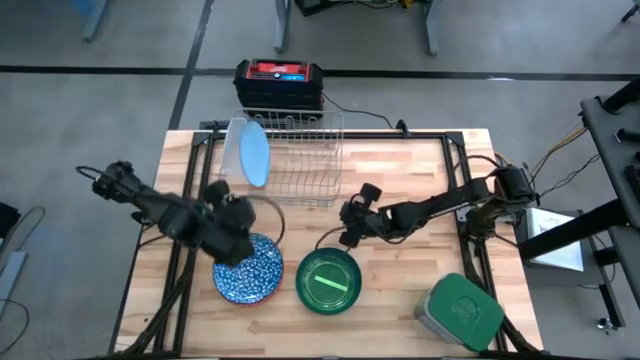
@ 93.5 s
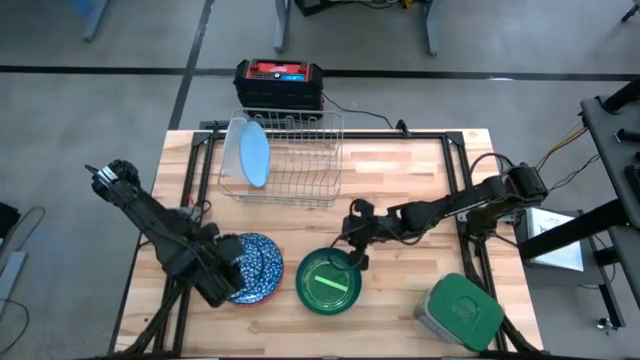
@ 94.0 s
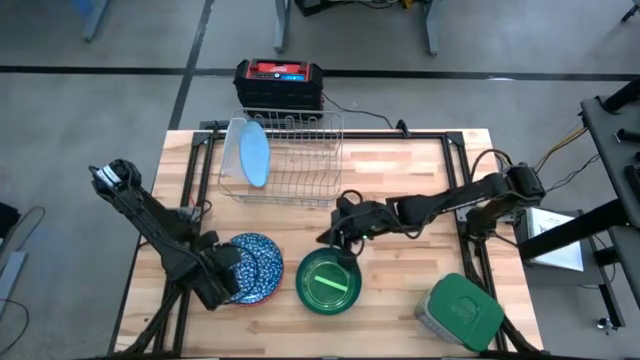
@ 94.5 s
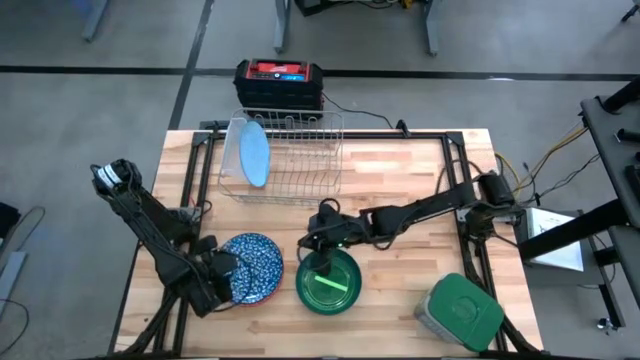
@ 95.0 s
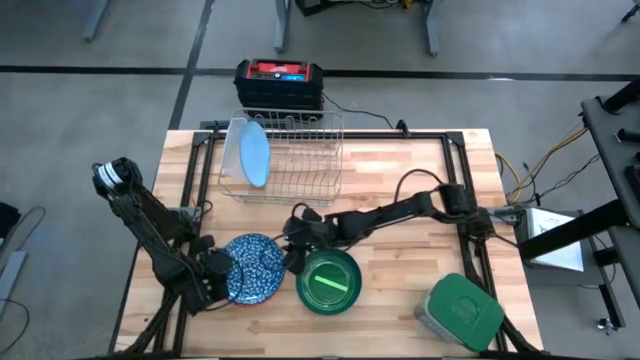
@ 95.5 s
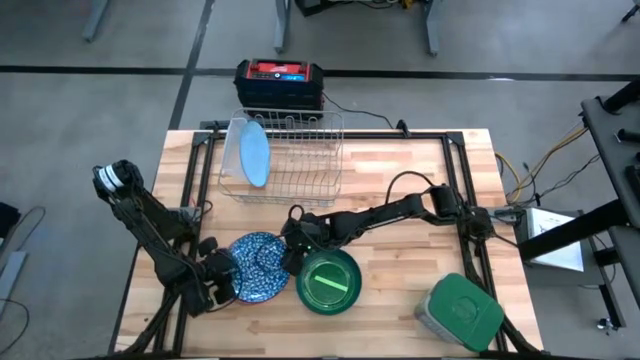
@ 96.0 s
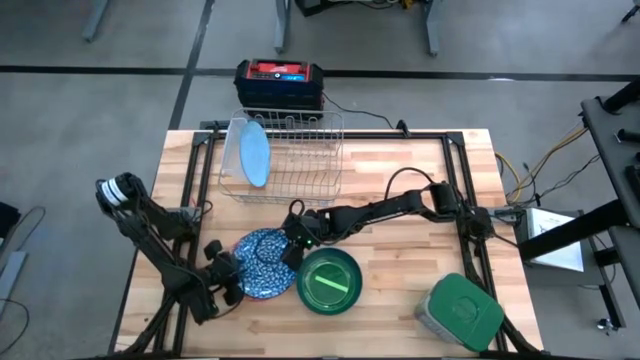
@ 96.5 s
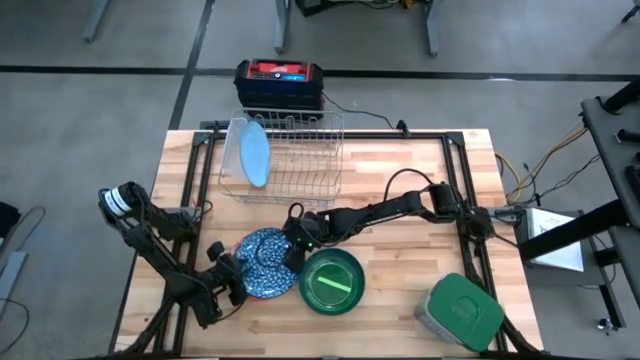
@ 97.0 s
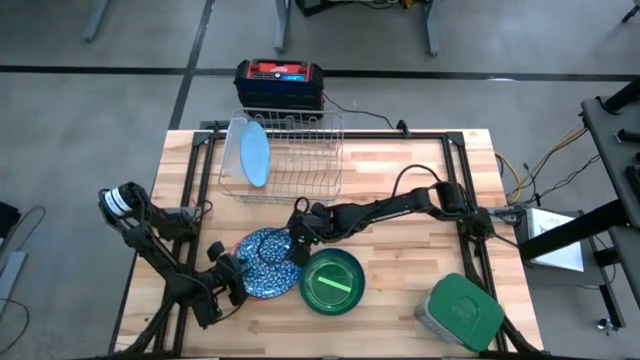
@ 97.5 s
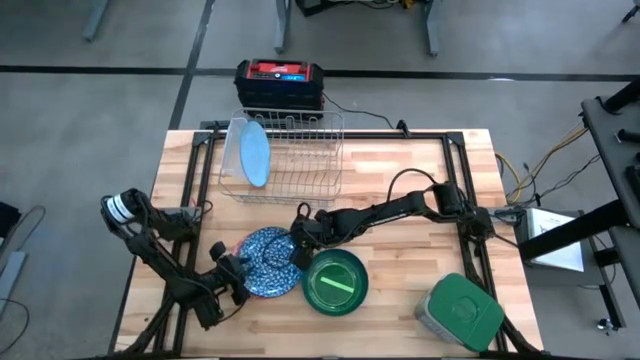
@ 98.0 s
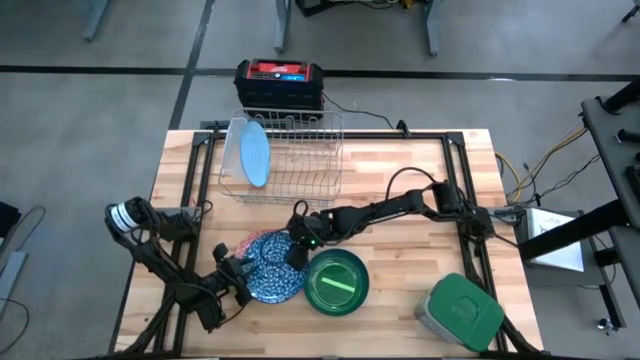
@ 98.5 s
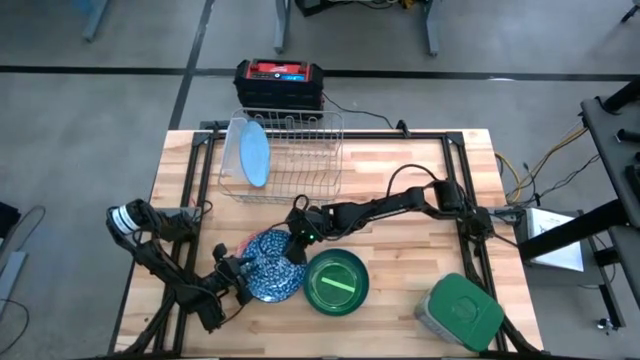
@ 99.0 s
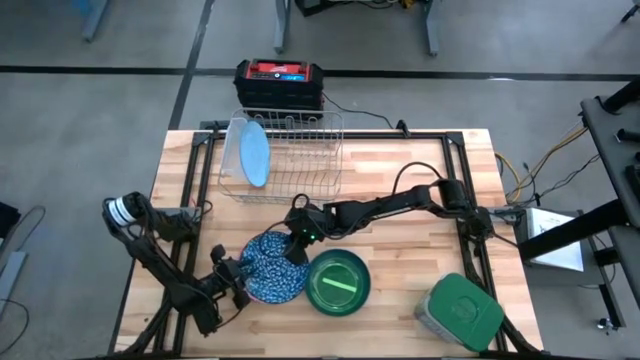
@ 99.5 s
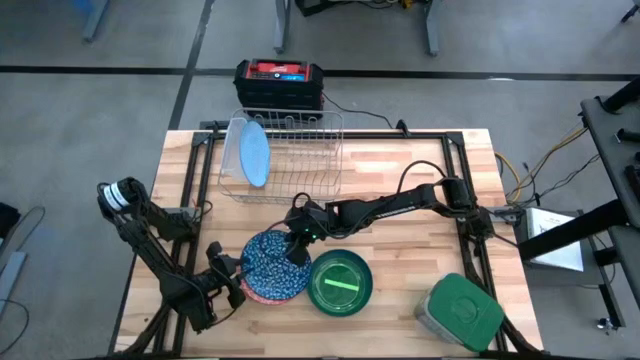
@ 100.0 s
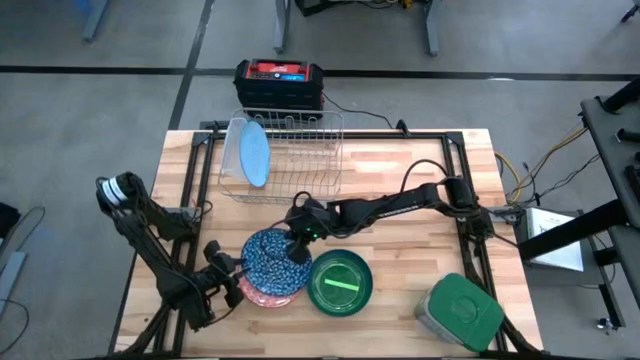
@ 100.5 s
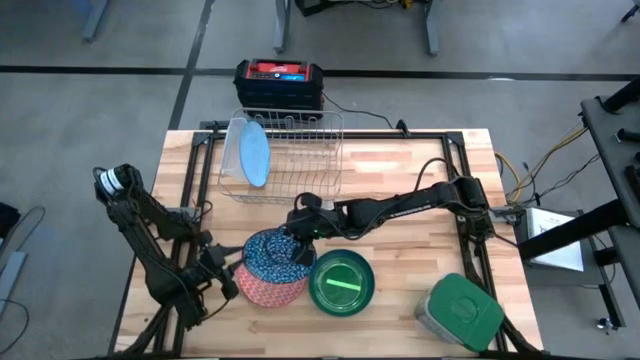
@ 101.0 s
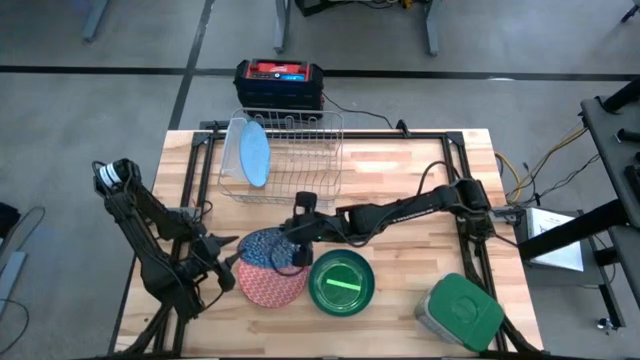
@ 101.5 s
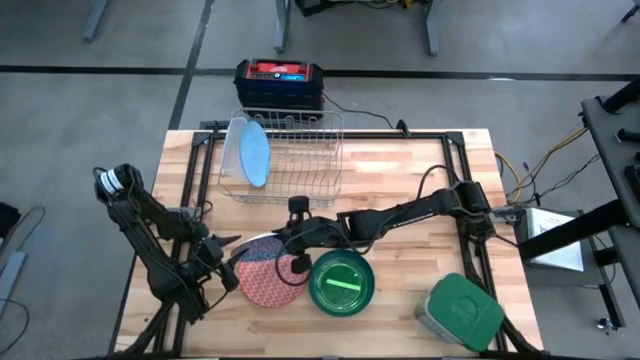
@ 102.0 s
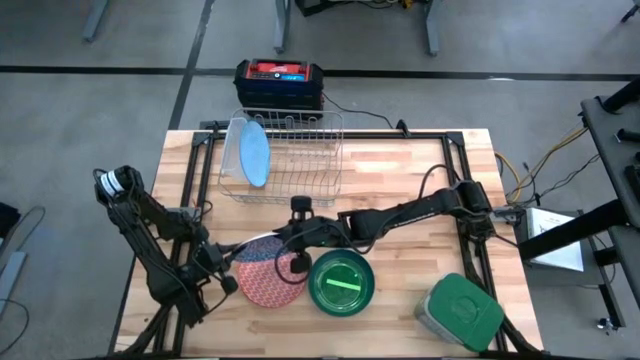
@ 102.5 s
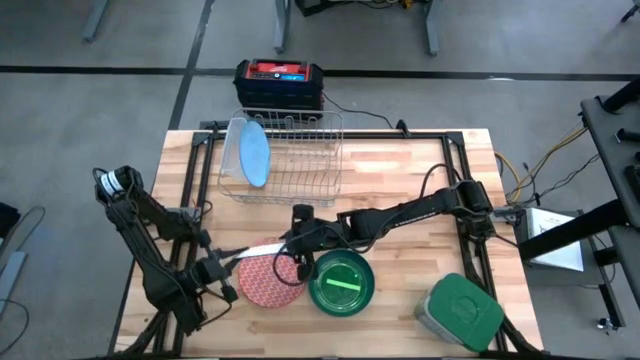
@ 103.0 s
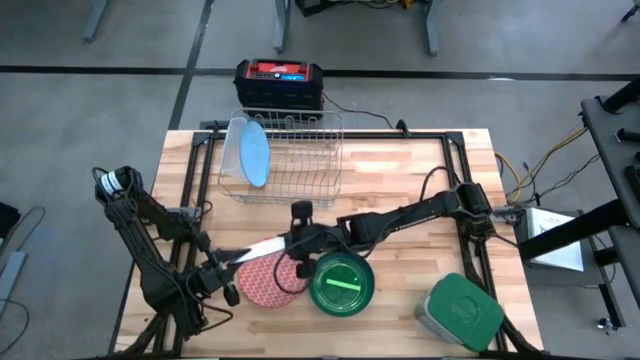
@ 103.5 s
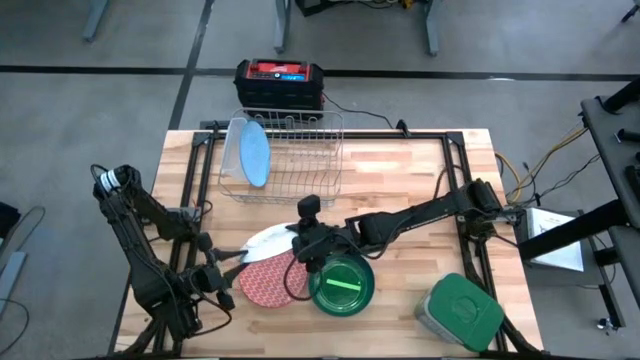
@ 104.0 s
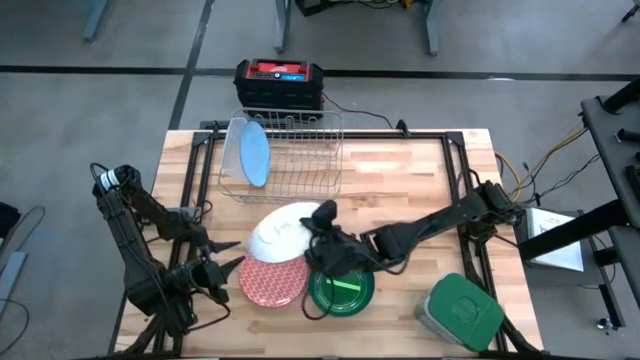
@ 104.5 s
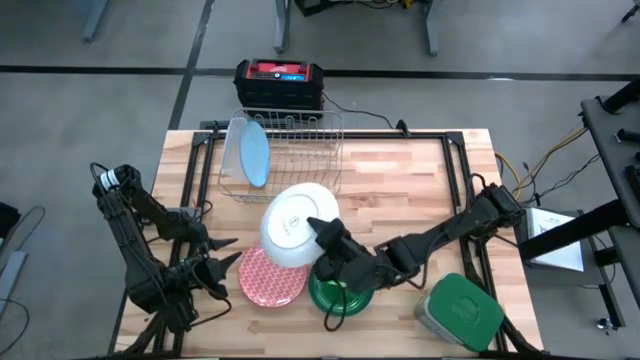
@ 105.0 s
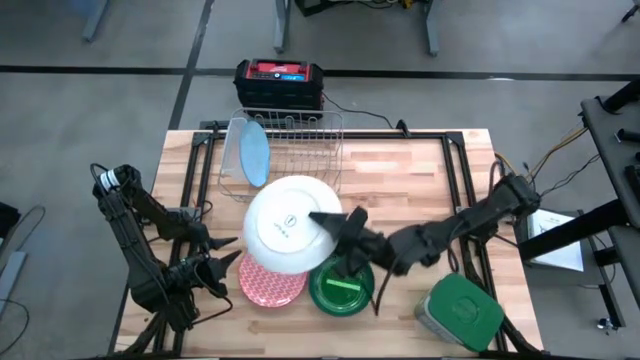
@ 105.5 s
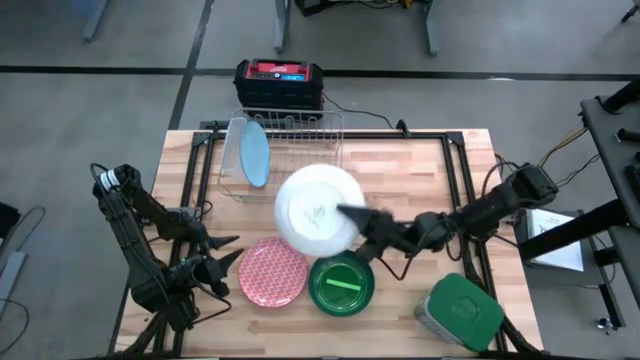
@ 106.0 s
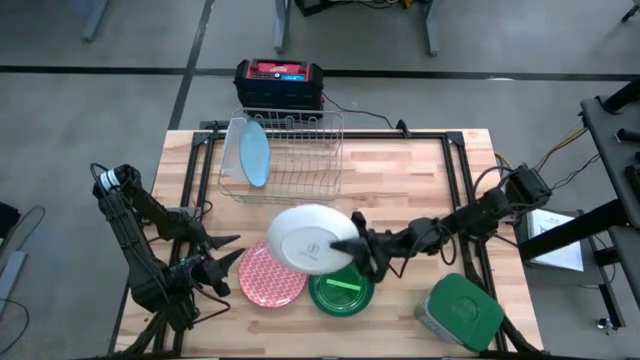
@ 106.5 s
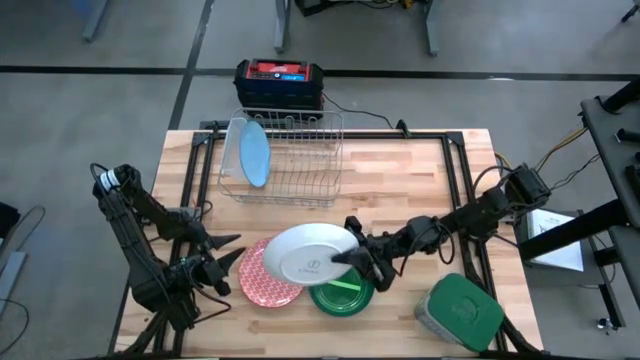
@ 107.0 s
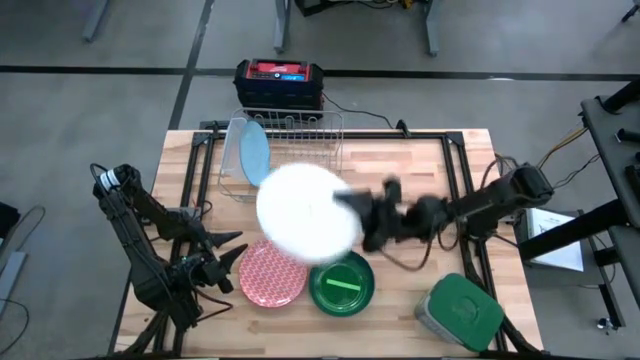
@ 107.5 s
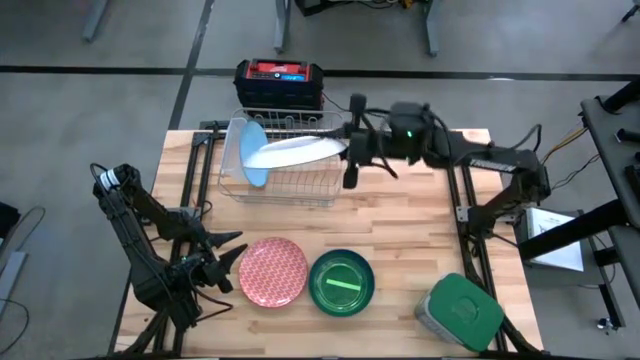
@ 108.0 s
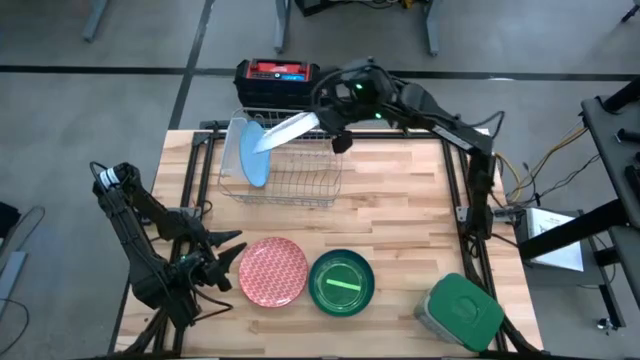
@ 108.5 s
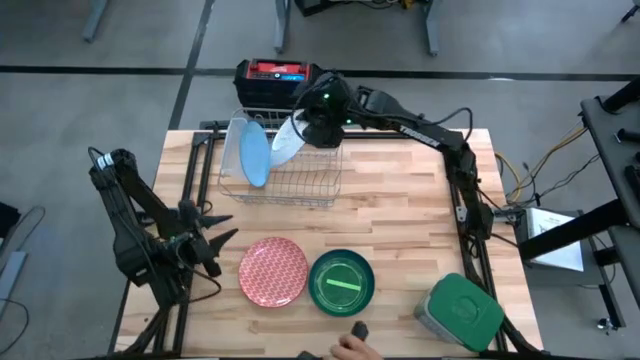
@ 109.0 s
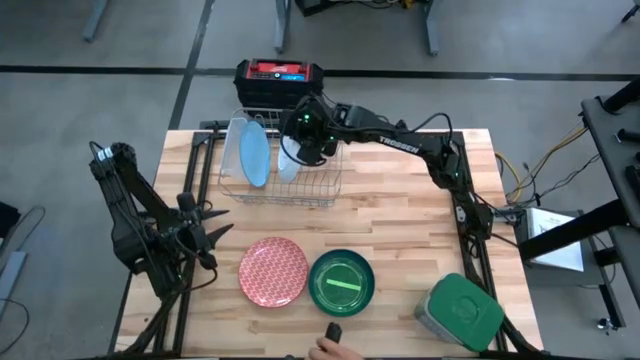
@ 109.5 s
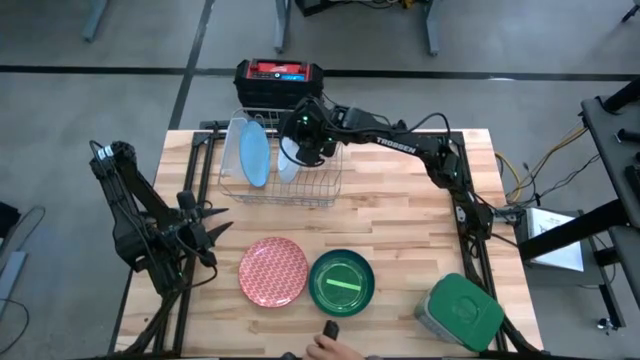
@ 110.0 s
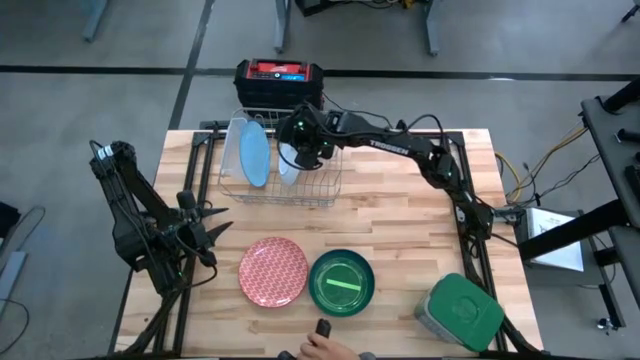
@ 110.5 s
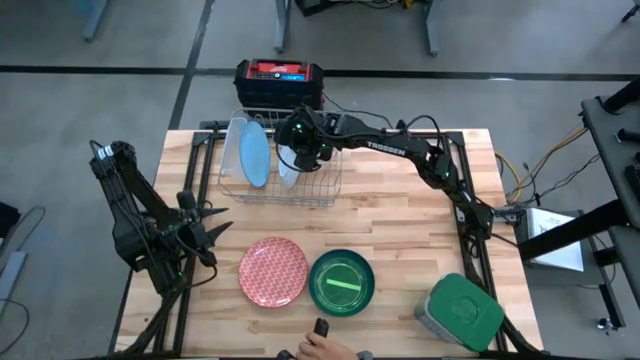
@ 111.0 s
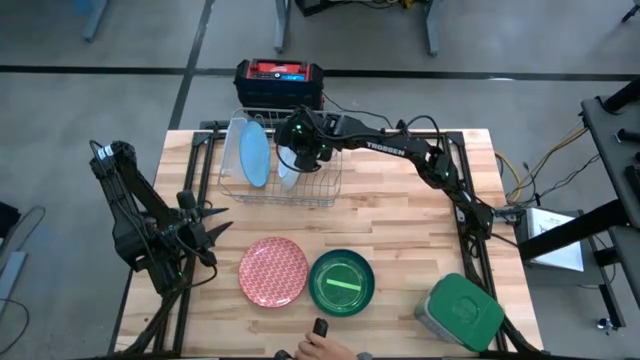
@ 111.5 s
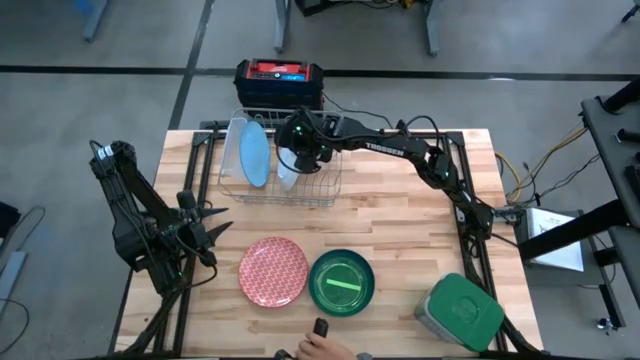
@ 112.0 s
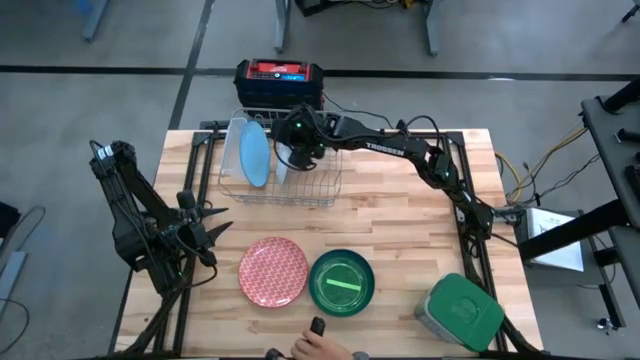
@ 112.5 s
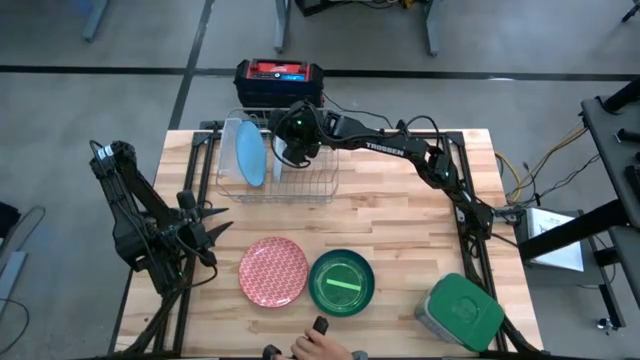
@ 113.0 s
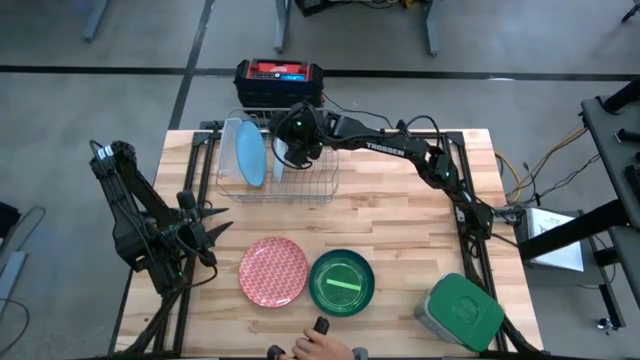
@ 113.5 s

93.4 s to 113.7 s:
Task: Sort dishes
Put the blue patterned plate into the dish rack

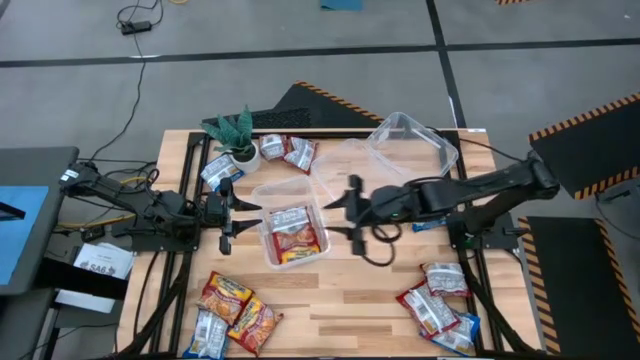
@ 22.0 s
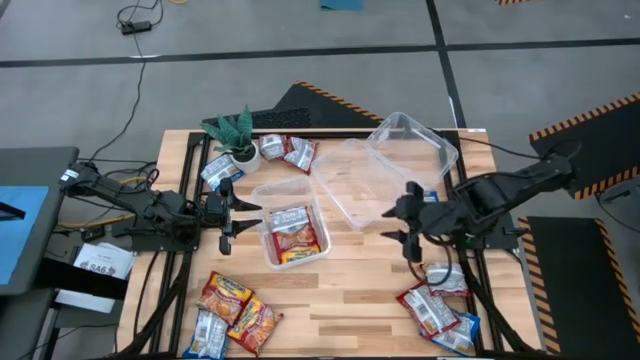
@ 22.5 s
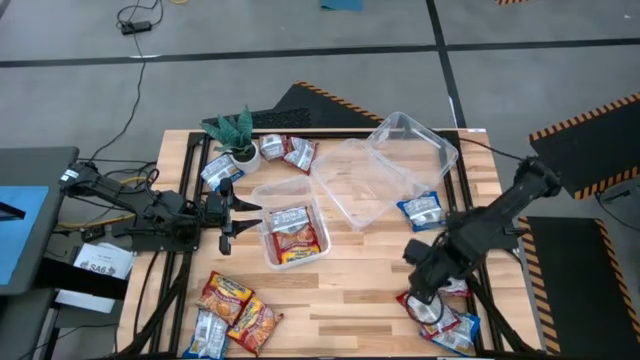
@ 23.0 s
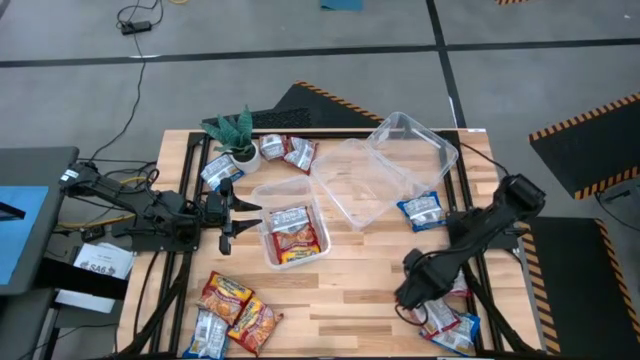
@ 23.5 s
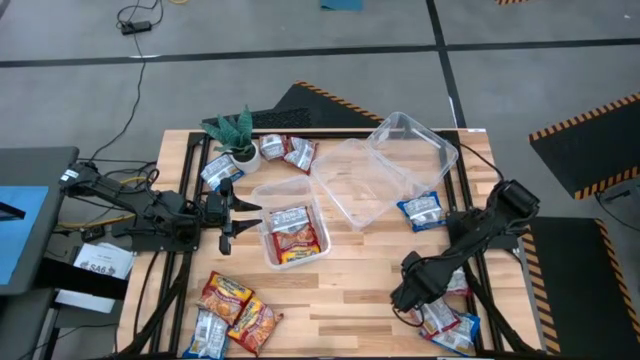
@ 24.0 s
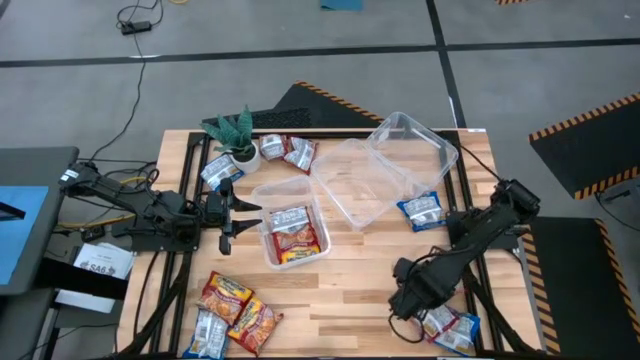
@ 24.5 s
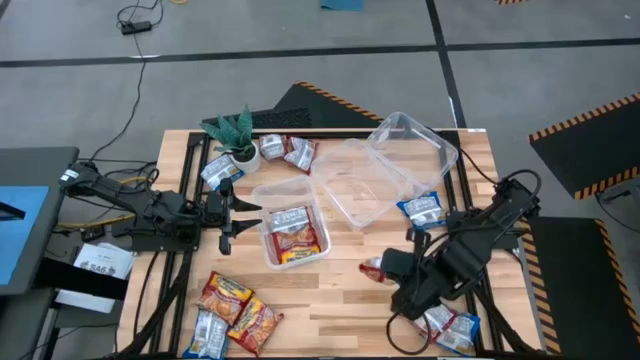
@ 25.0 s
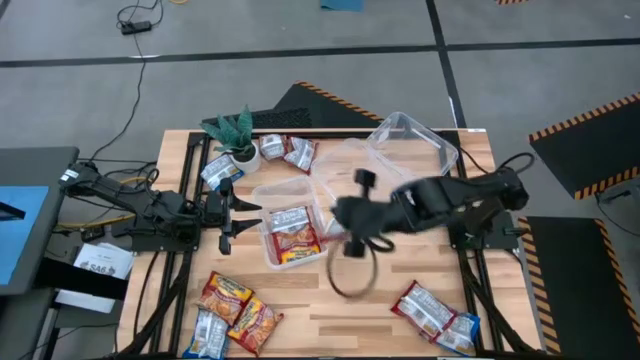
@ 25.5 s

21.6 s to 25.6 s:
Task: Sort Maruchan noodles
Put the red noodle pack into the bottom bin
